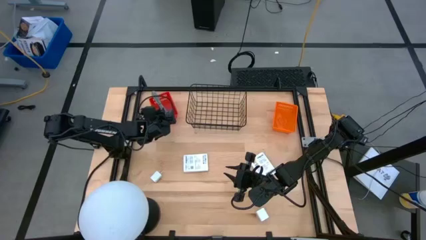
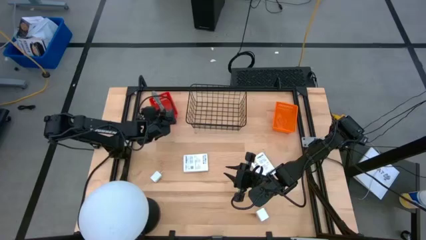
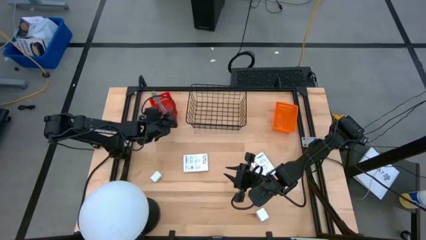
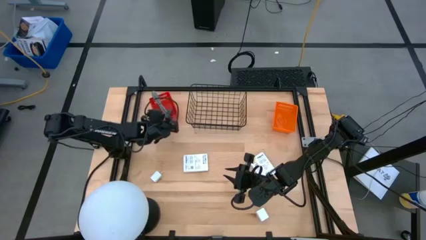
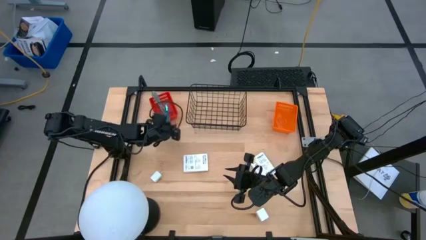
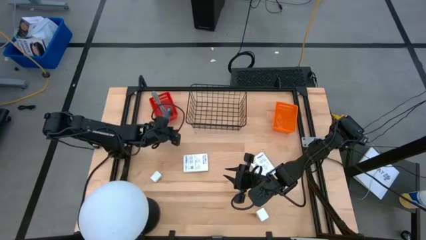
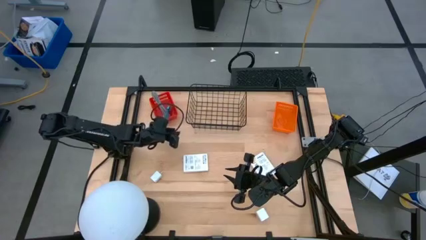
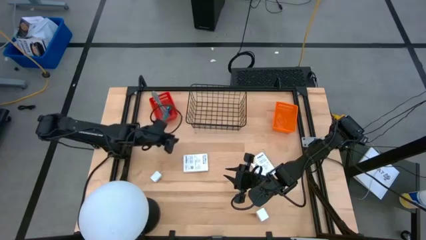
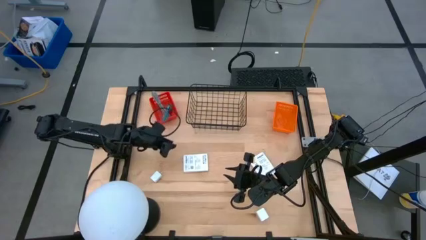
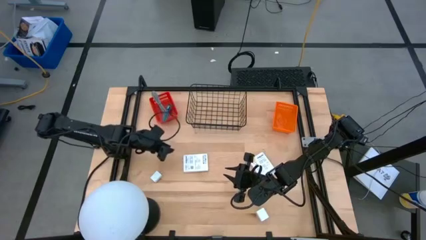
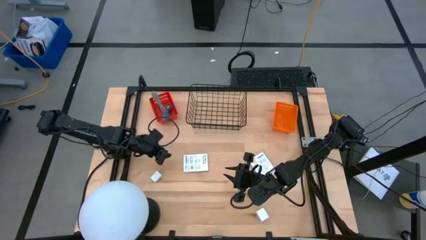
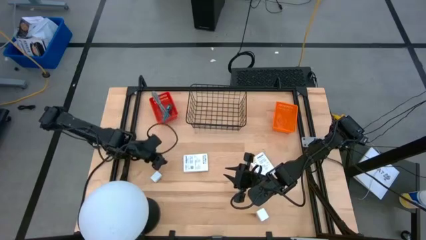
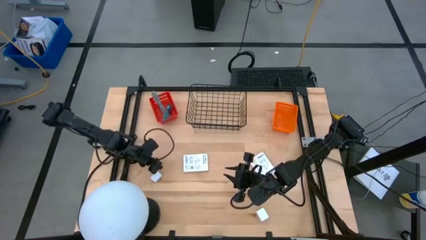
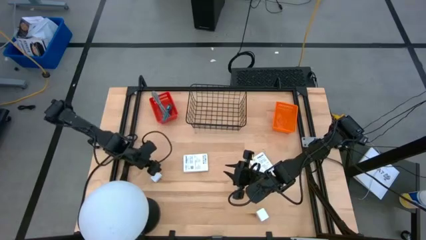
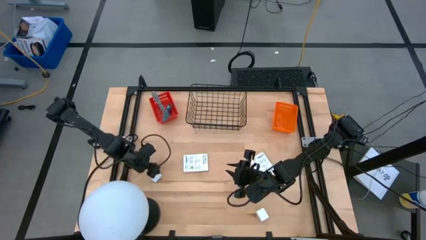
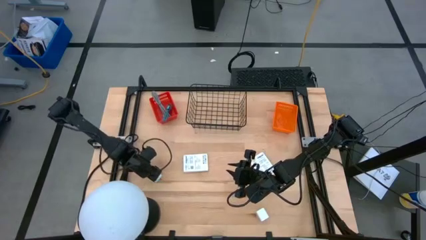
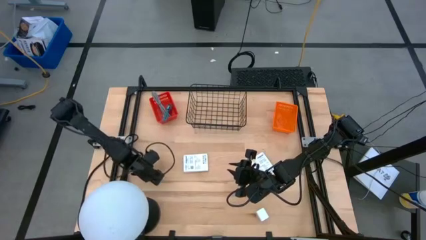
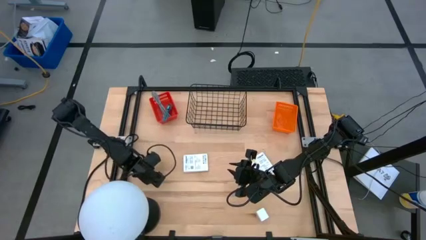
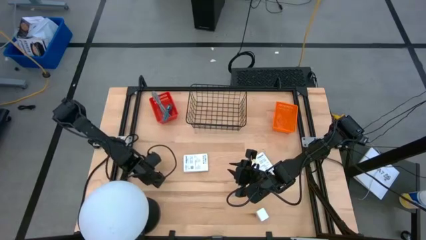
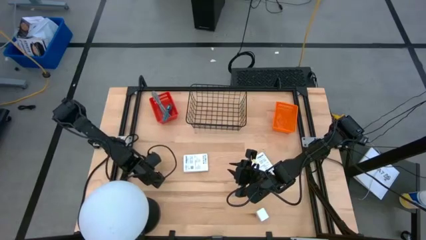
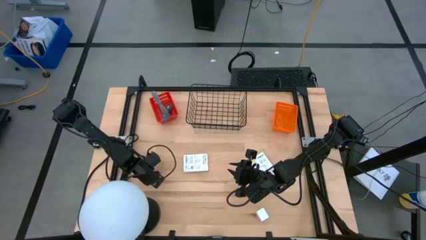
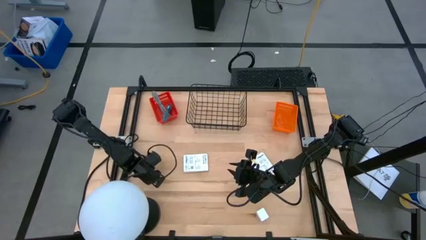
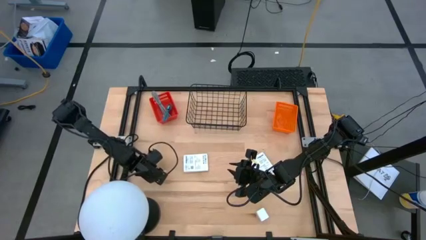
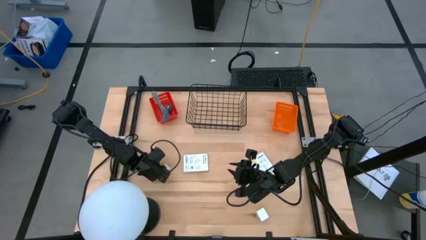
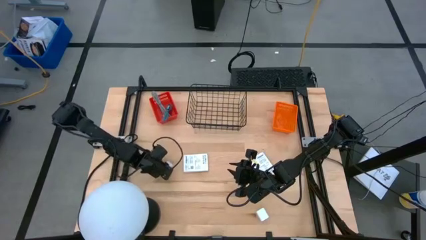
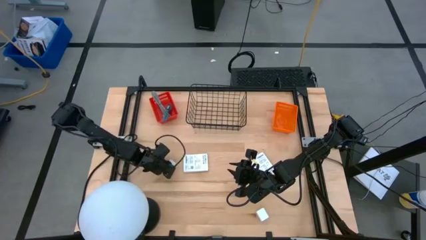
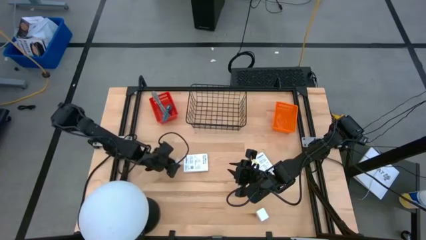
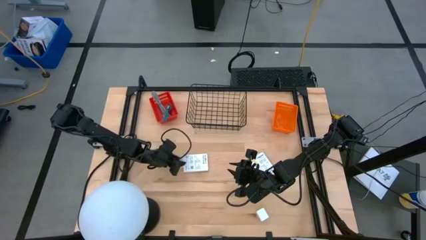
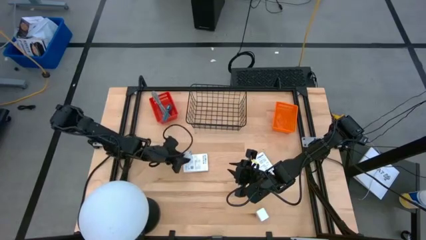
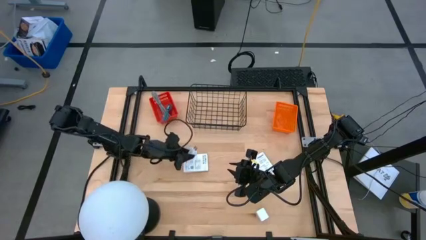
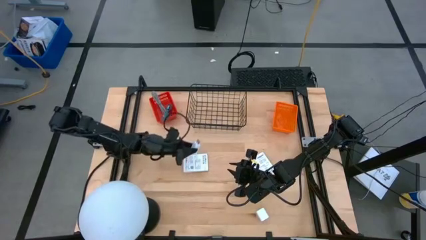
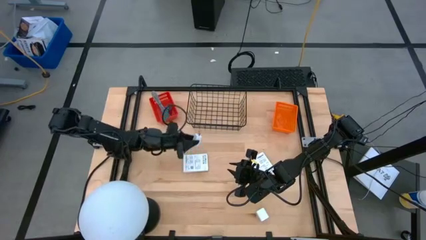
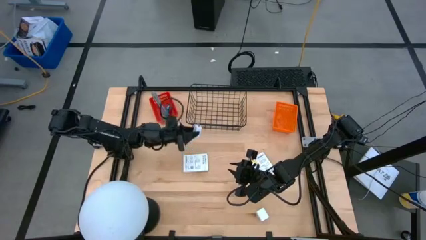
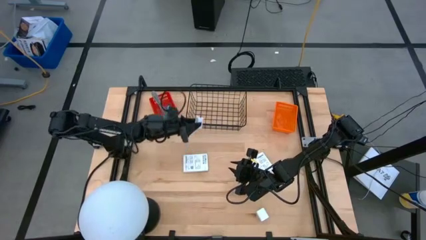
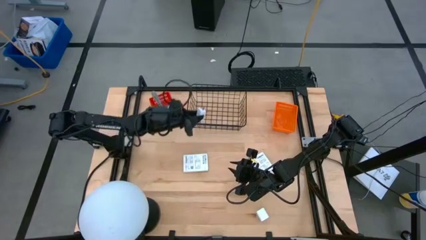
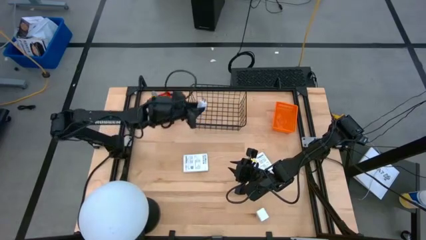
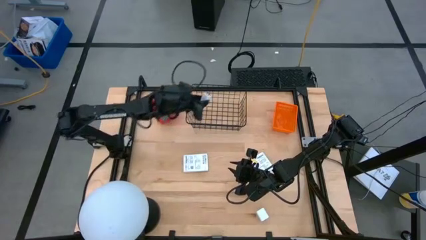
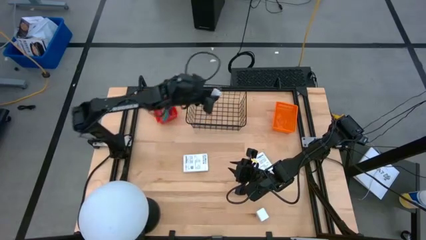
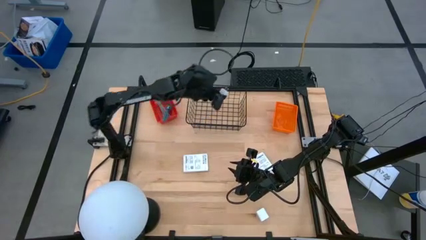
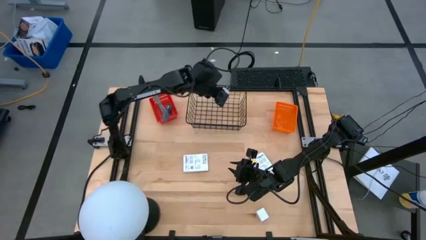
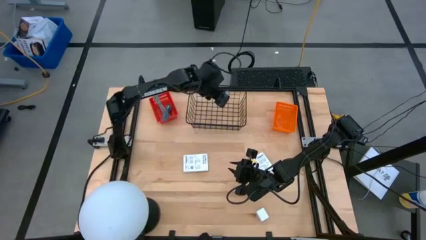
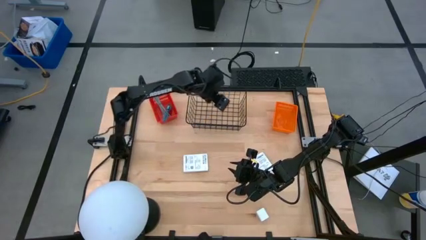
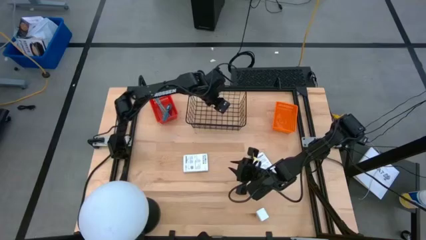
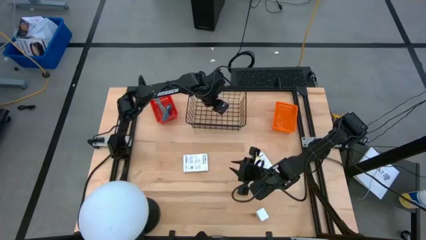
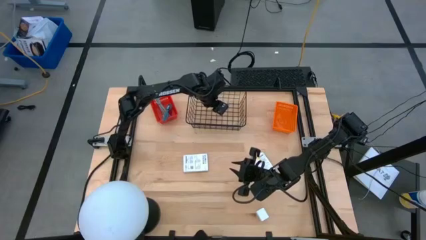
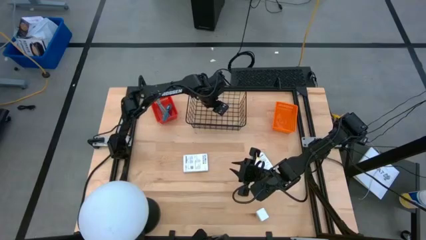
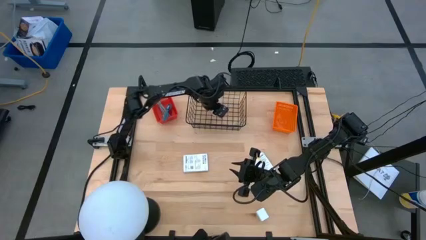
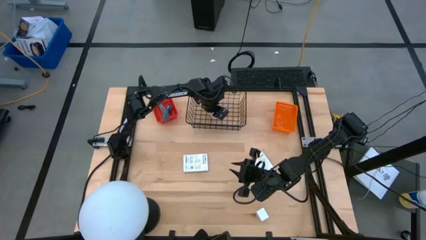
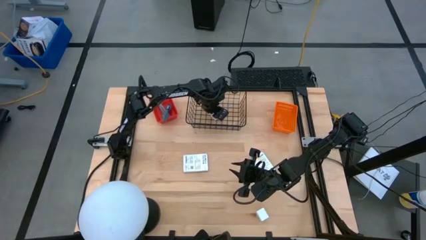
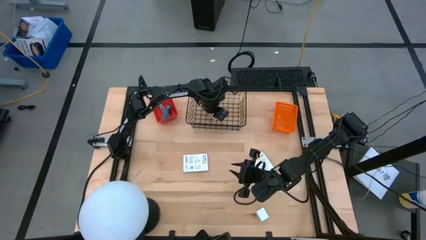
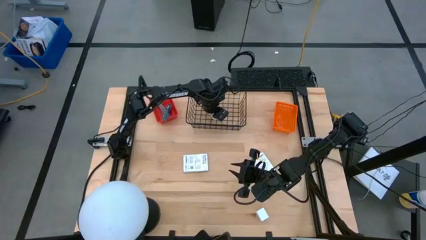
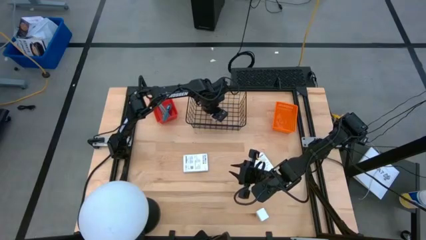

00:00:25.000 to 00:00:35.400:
Task: Pick and place items into bin
Put the left white charger adapter into the wire basket
